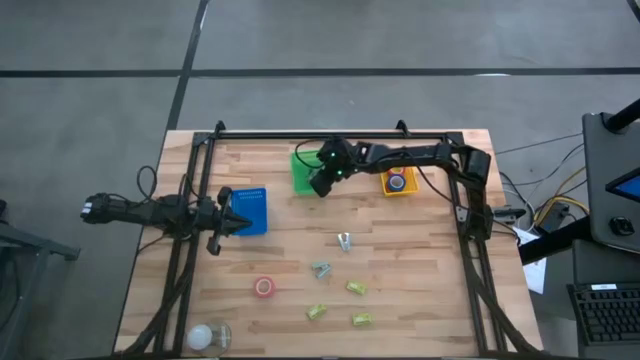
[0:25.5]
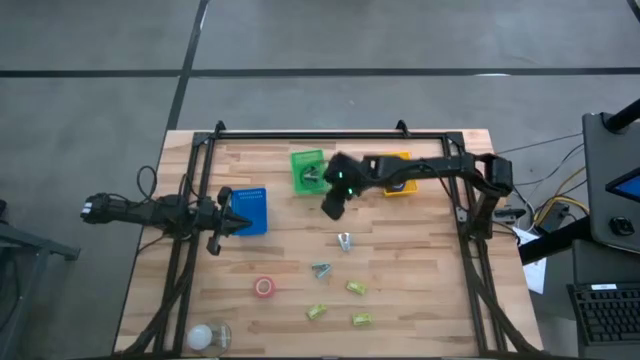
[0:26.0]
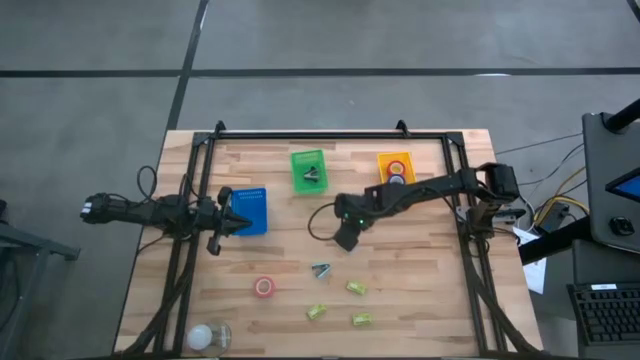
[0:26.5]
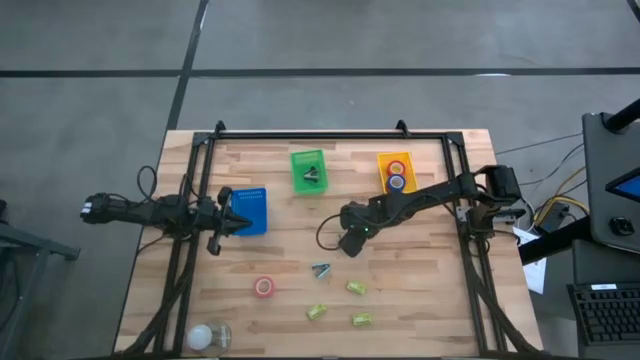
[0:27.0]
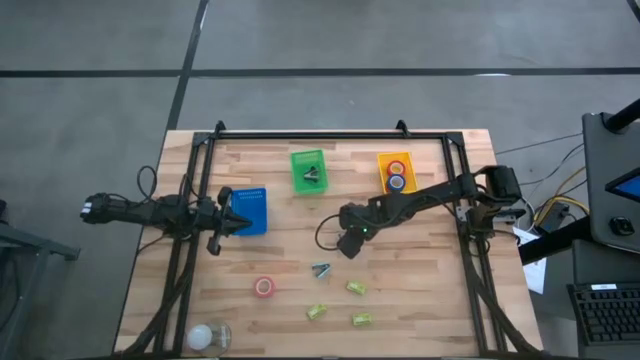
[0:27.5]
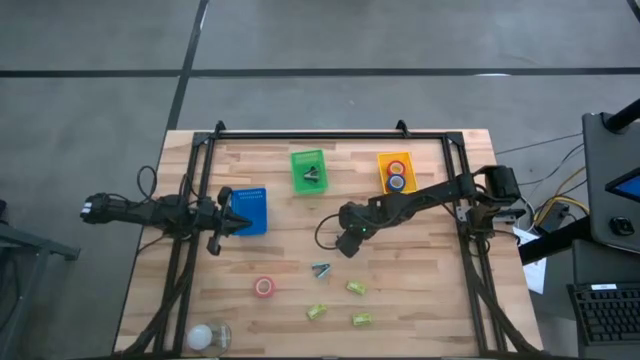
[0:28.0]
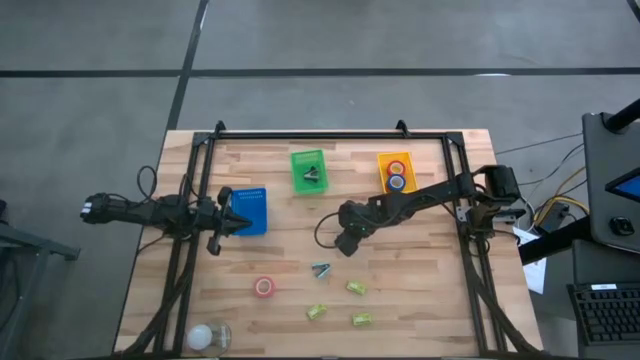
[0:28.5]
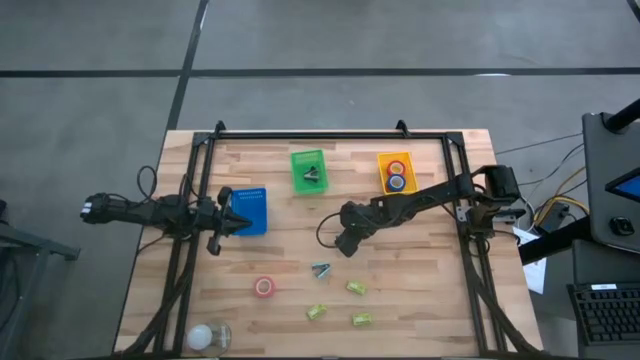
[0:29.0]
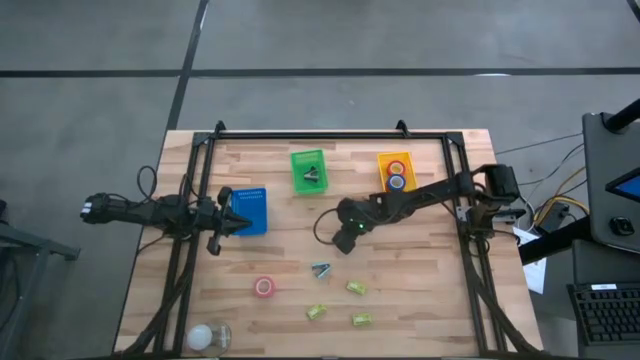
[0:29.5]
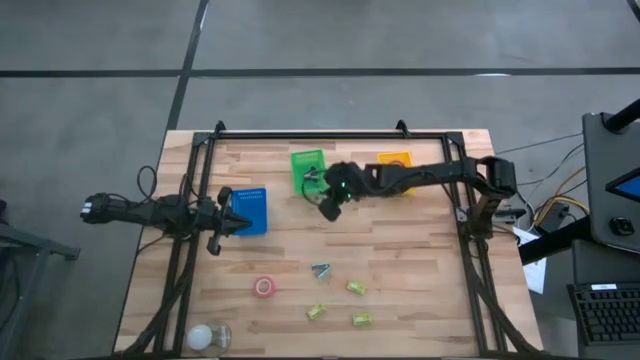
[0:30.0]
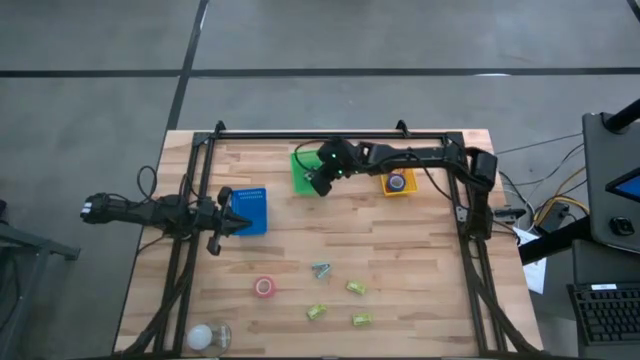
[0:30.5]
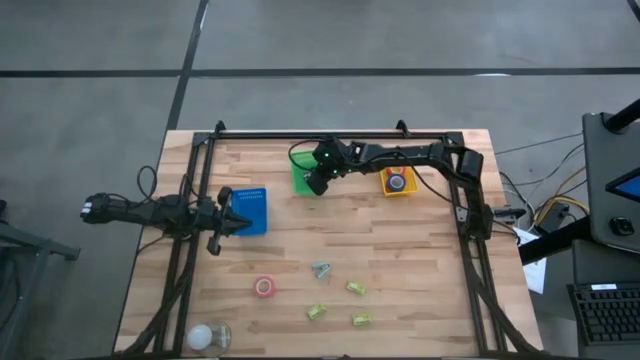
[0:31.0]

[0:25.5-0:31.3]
Task: Pick and place Stapler, Stapler remover, tape
Put the top blue staple remover into the green bin

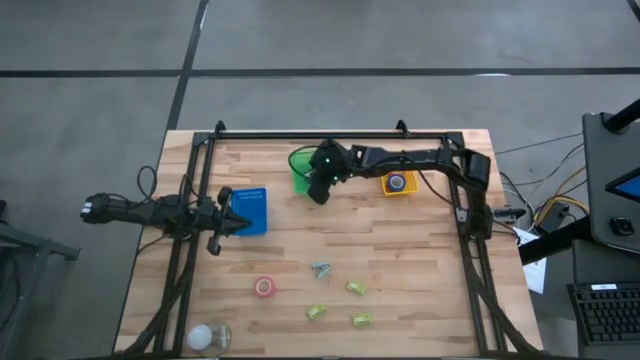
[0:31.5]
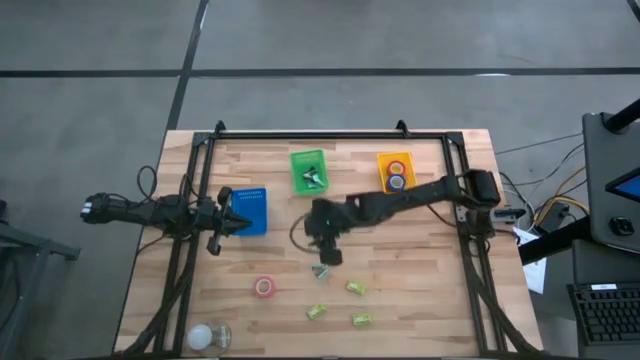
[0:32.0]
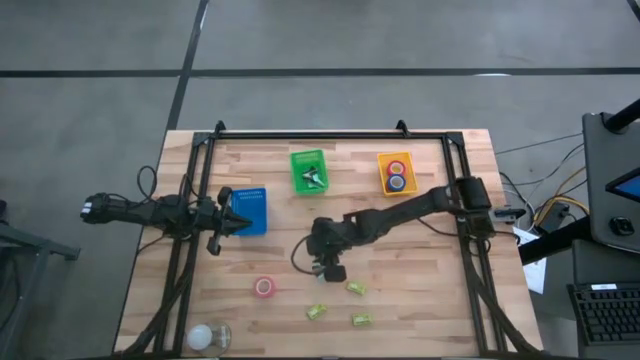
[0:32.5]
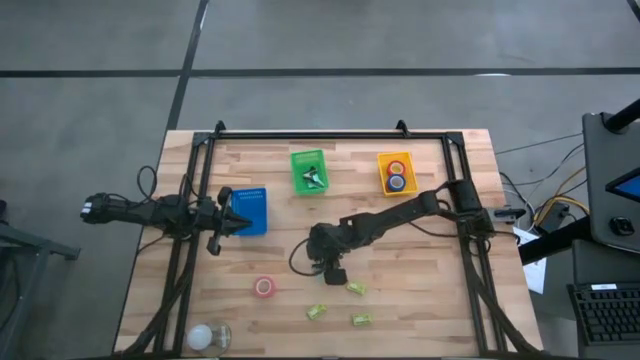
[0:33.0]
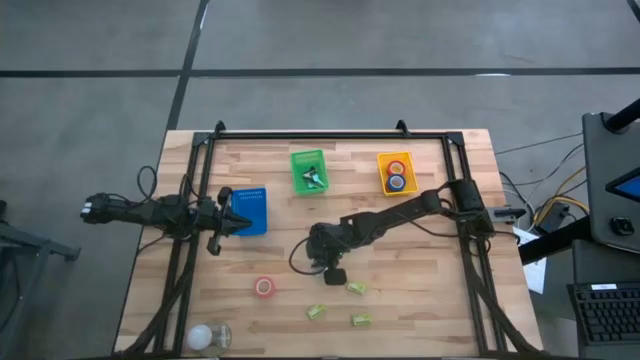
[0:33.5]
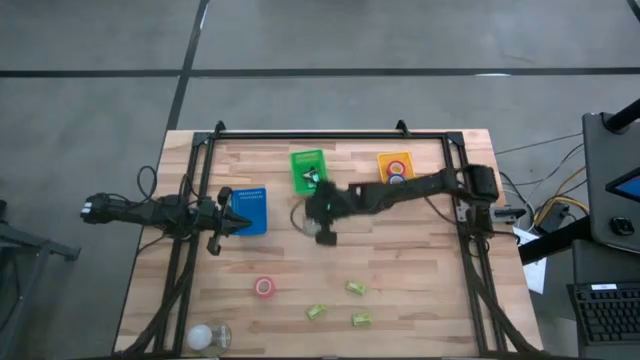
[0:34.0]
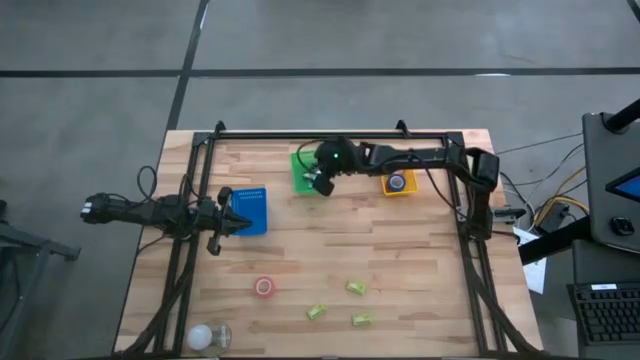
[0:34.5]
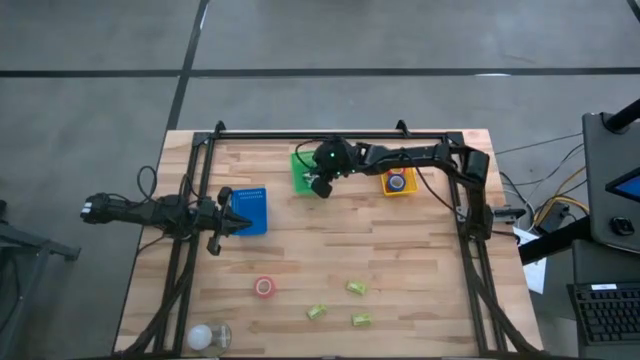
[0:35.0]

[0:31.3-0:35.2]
Put the blue staple remover into the green bin

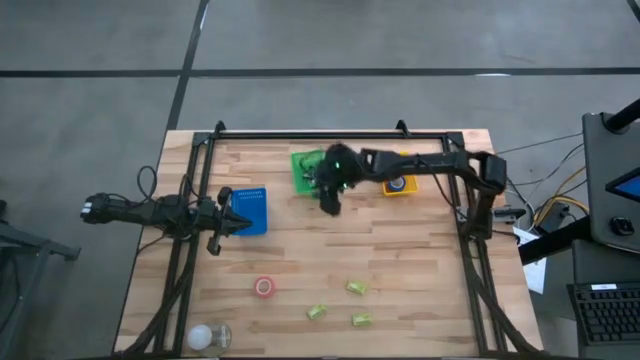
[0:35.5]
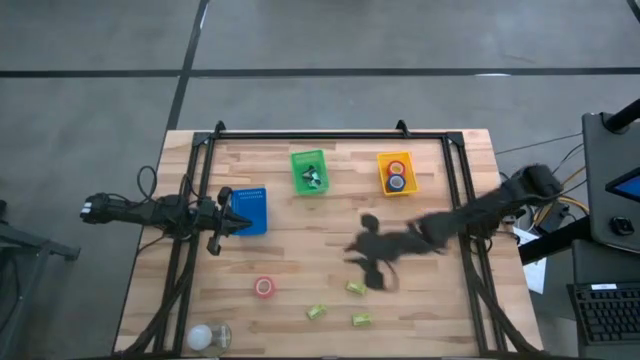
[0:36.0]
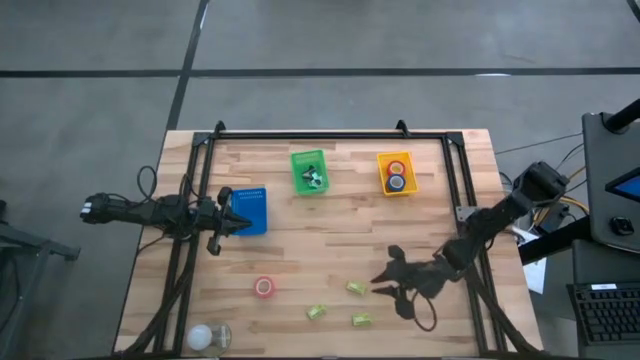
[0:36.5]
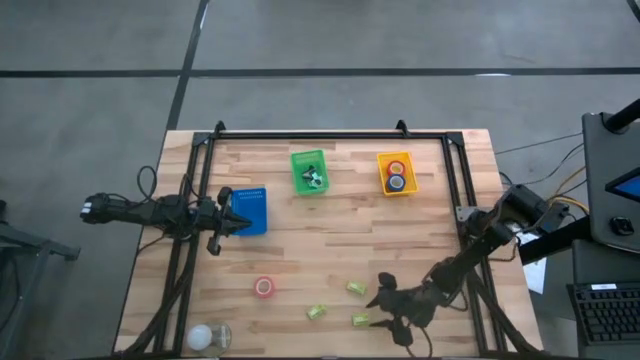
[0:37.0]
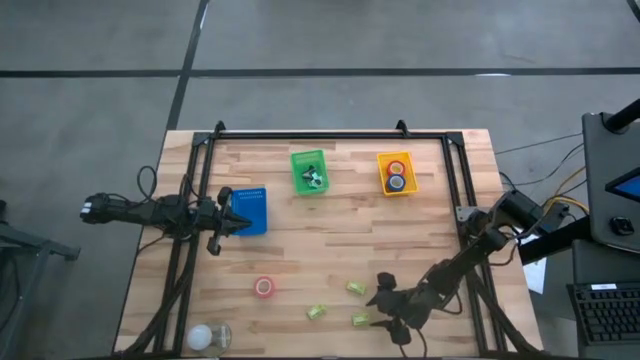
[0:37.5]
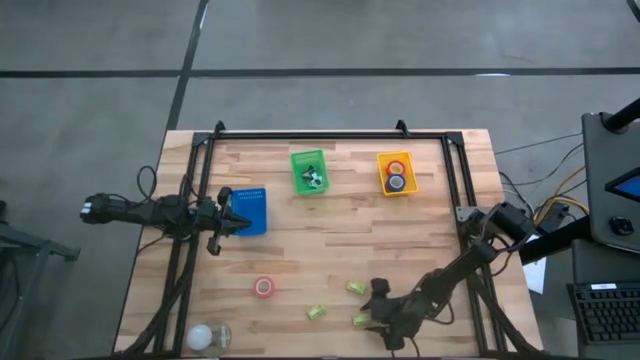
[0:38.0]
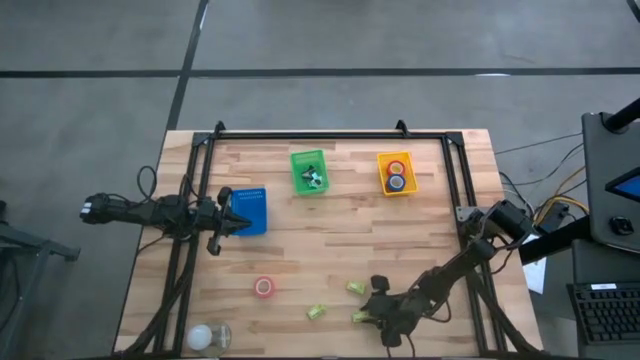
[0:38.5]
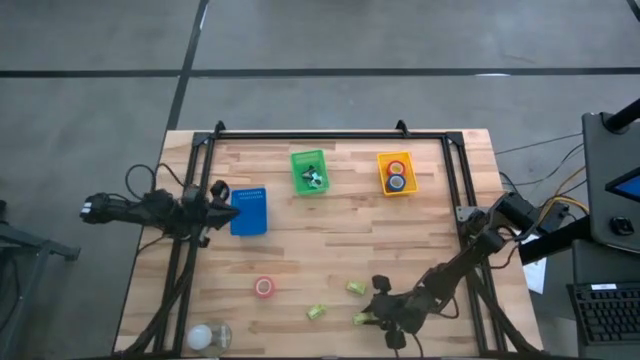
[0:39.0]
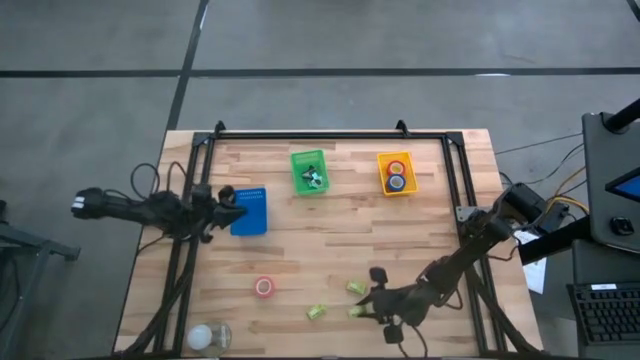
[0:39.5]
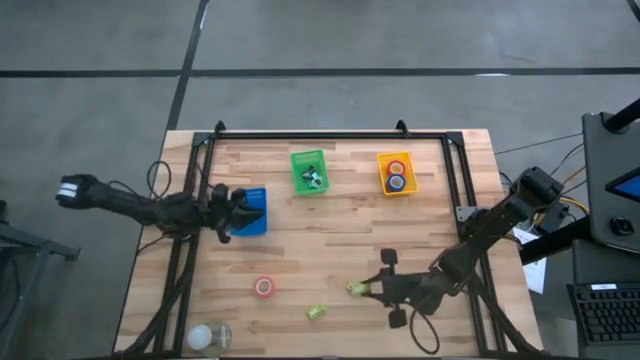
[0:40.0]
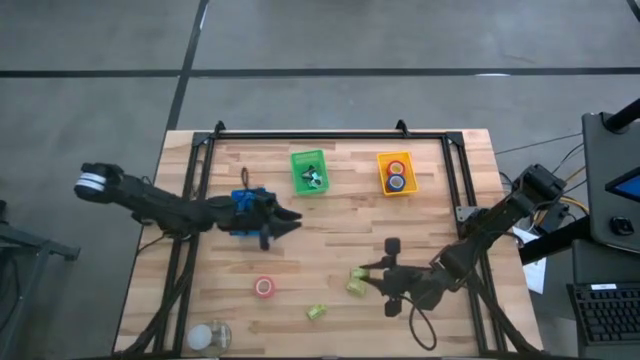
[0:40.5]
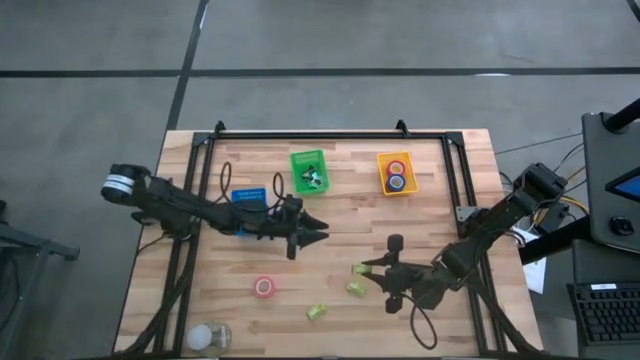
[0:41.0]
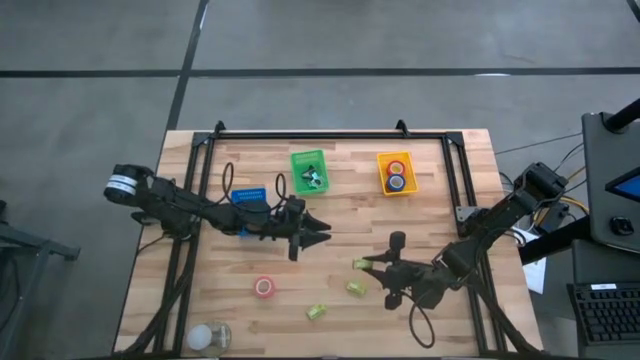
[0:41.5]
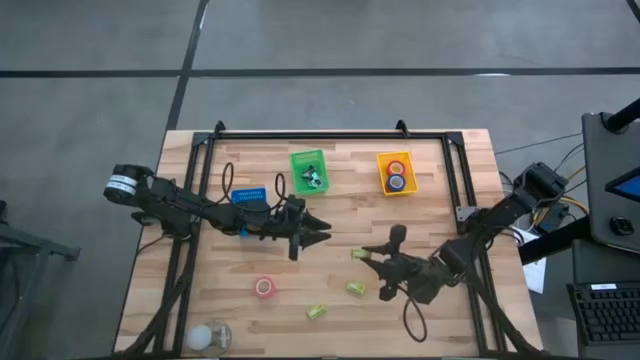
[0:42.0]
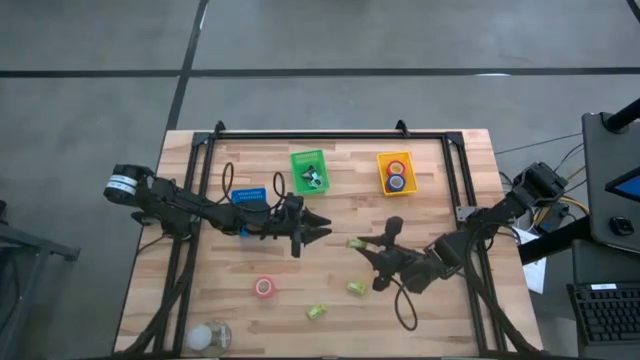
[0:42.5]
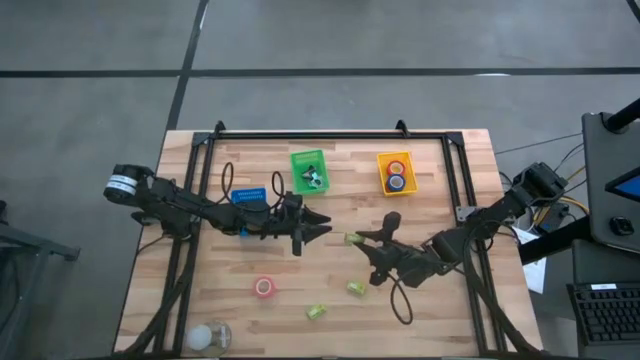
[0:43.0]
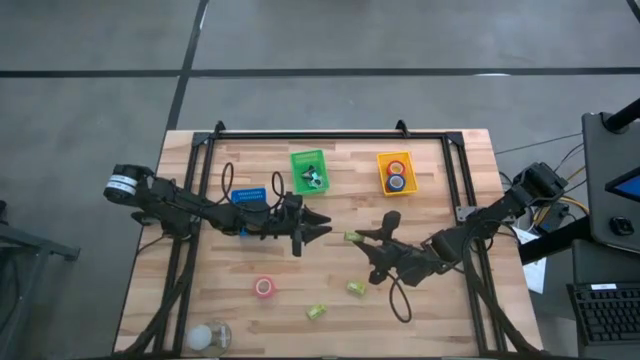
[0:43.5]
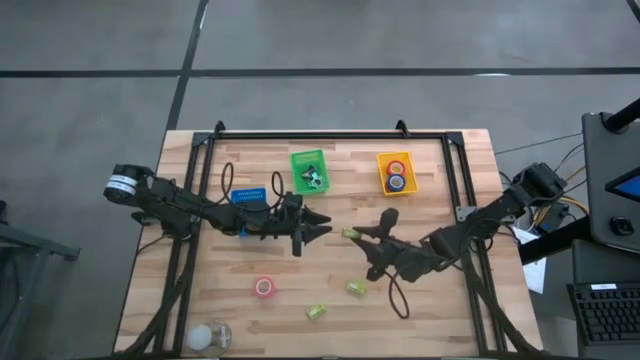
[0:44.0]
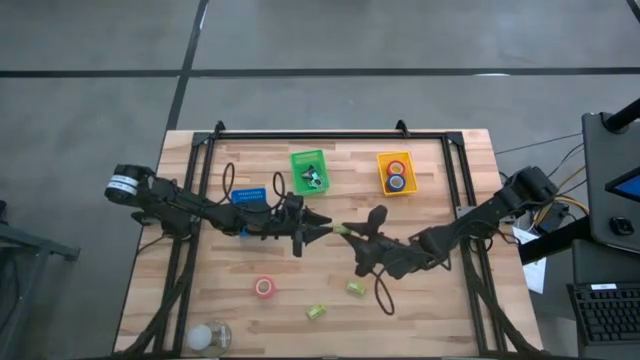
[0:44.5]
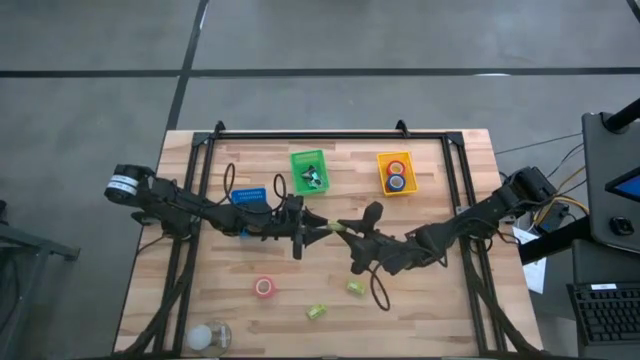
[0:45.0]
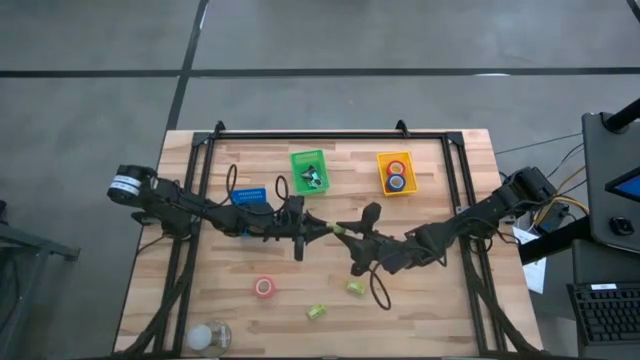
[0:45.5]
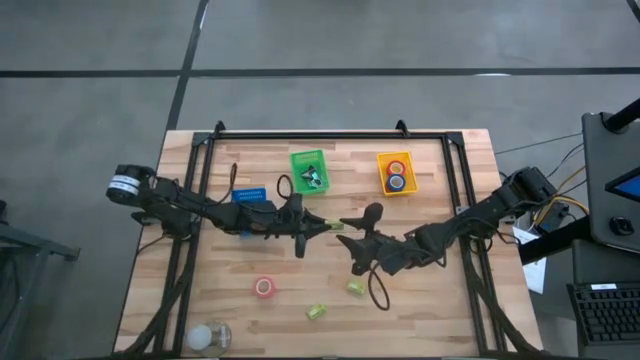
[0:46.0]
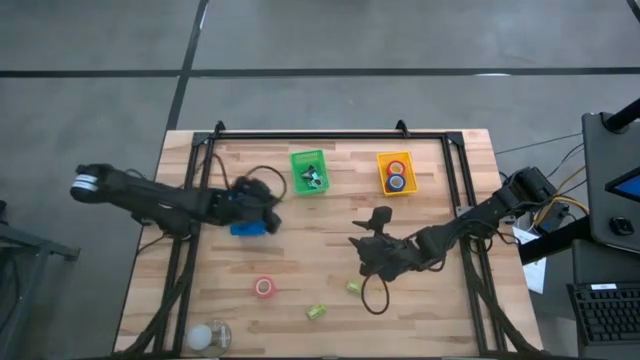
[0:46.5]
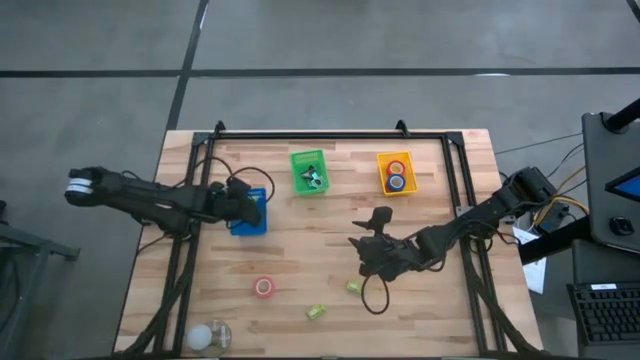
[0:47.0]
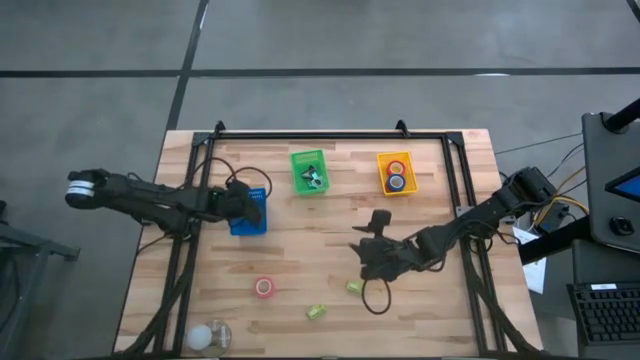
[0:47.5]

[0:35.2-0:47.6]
Put the bottom right green staple pin box into the blue bin
